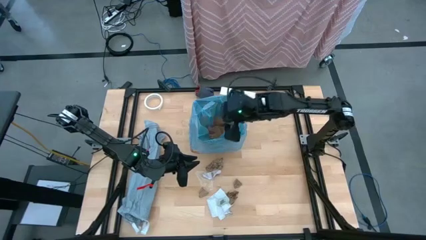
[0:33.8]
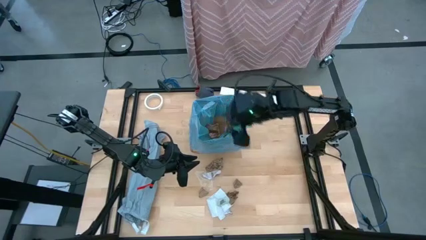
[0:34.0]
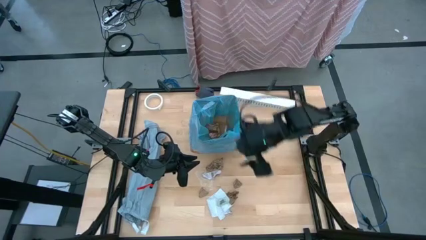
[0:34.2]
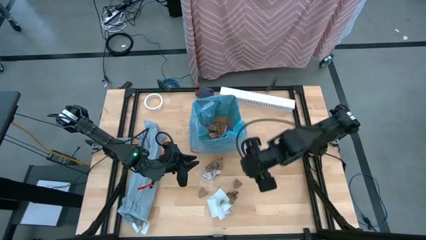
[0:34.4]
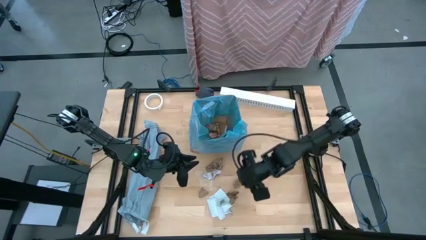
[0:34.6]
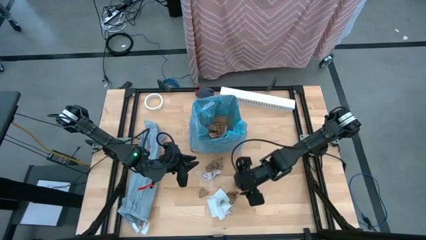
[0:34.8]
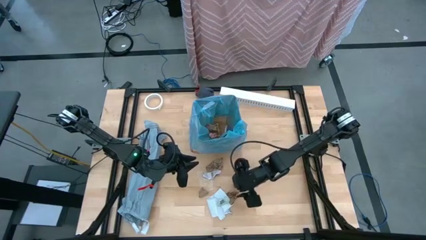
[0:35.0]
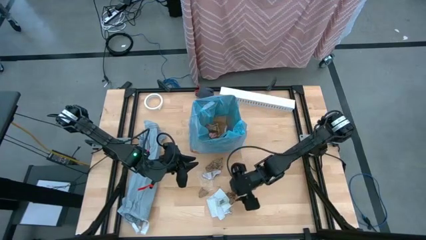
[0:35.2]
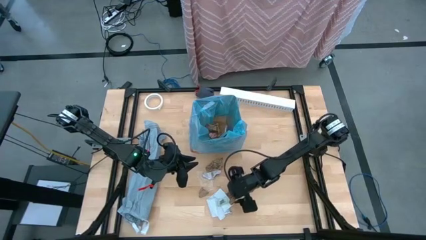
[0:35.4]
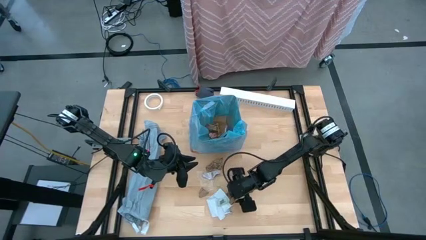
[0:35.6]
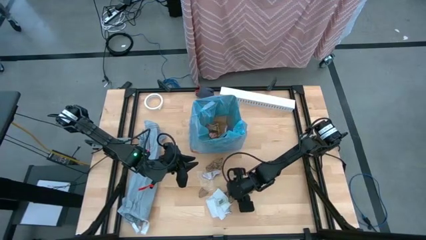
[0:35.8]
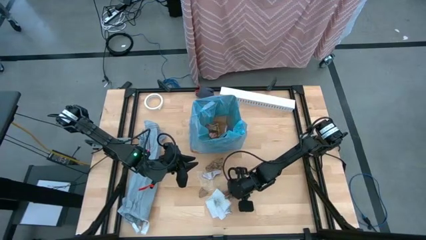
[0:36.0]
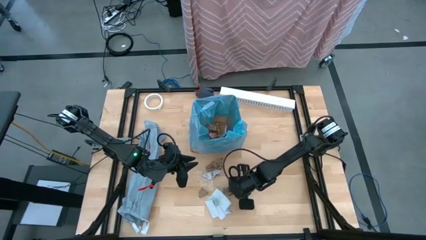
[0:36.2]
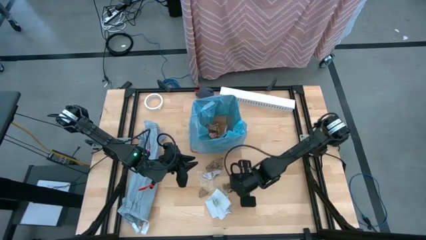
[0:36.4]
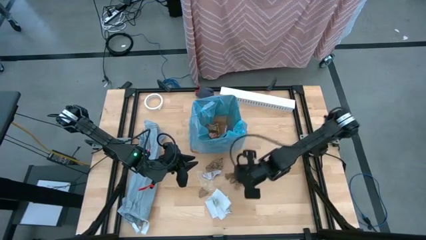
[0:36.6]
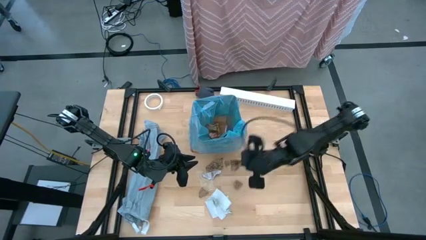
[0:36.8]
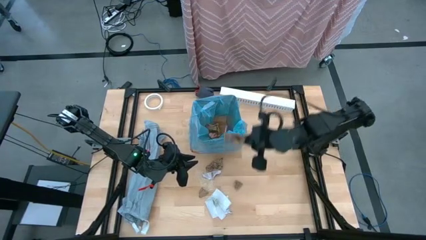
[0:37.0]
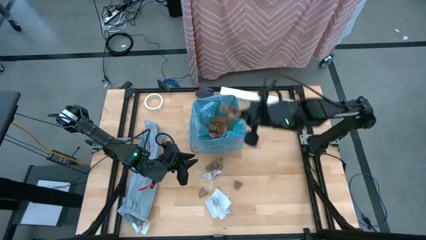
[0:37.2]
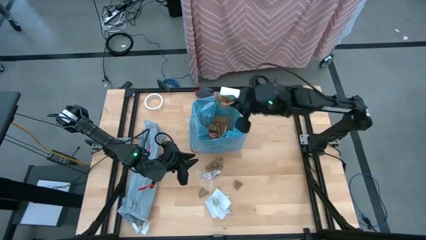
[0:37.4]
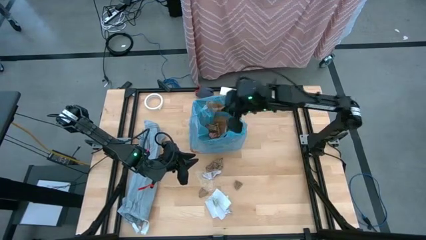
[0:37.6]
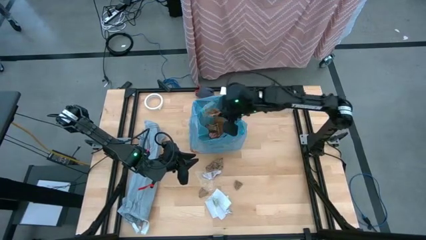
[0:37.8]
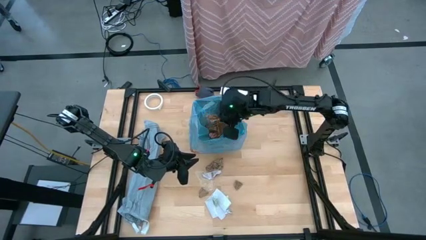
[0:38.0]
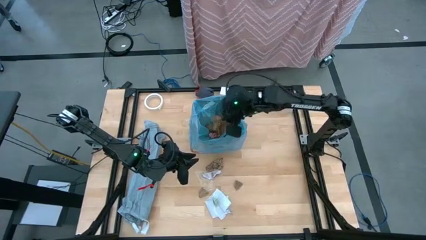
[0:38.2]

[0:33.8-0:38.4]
Task: place trash/remove bag and relplace
Put the brown napkin into the trash bin

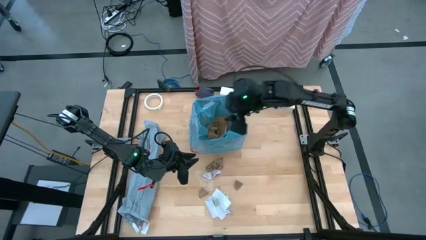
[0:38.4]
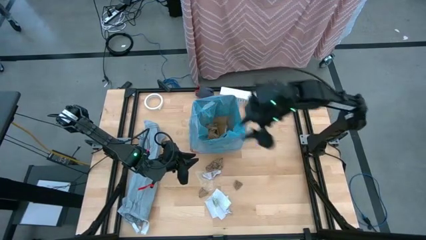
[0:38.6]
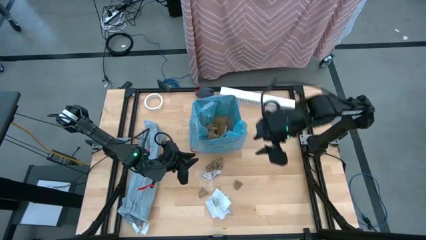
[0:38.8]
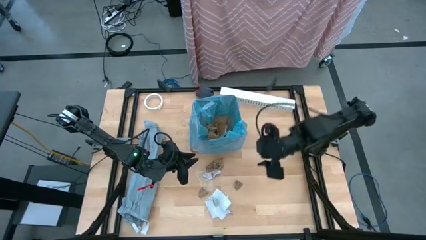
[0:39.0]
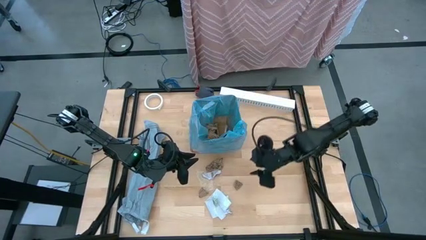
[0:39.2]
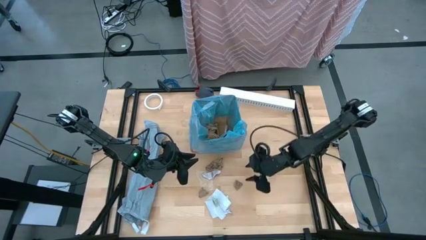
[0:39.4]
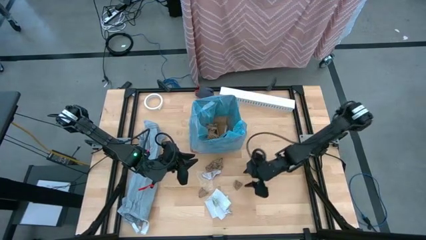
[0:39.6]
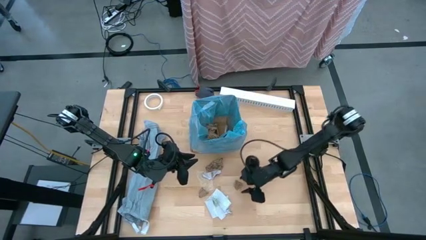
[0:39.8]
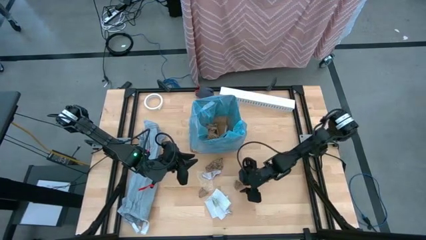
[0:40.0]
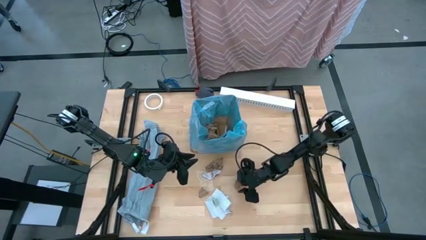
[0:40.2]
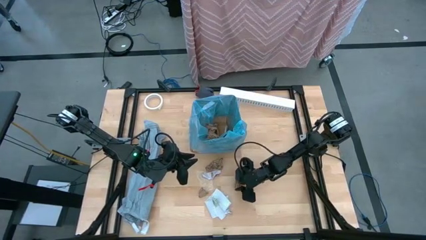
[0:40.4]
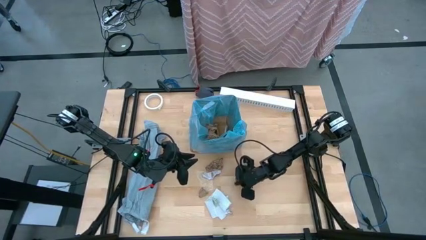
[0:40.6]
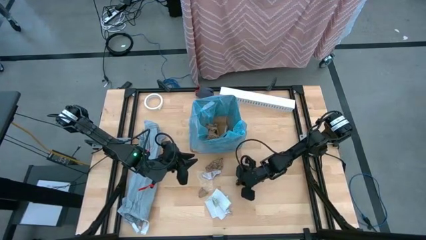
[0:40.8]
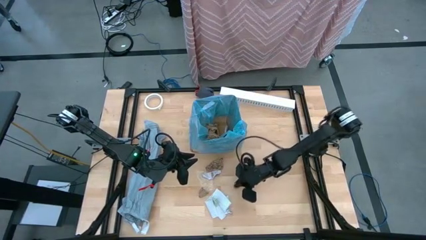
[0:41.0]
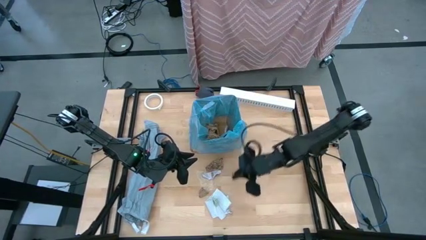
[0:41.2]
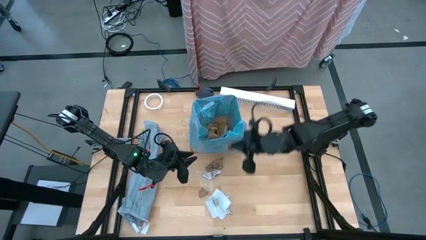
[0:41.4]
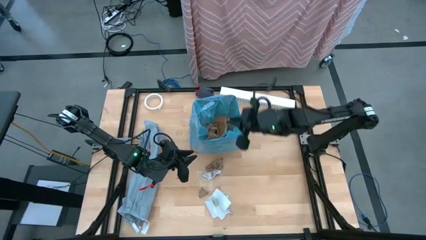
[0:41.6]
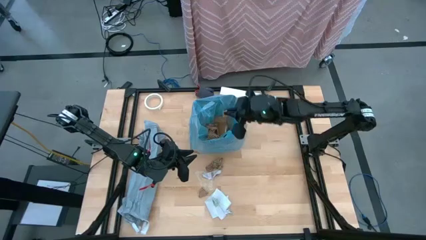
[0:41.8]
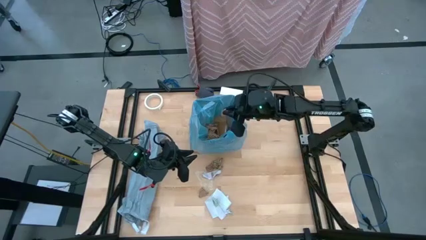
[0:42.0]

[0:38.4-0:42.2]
Put the brown napkin into the trash bin

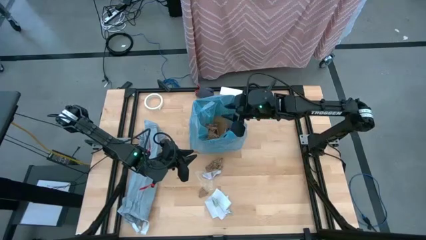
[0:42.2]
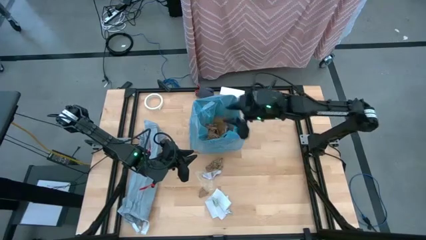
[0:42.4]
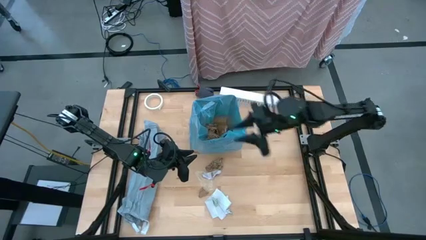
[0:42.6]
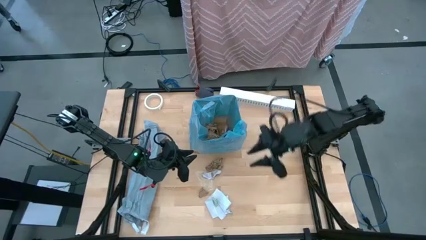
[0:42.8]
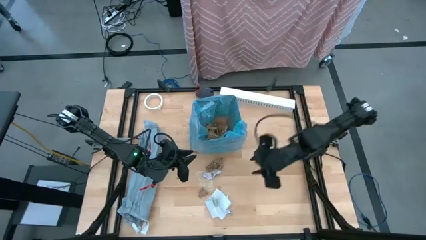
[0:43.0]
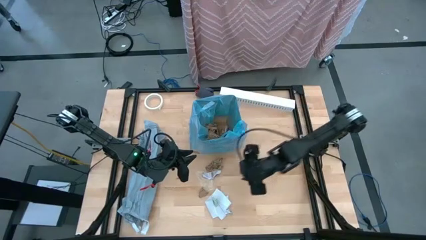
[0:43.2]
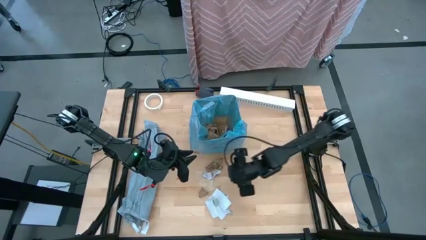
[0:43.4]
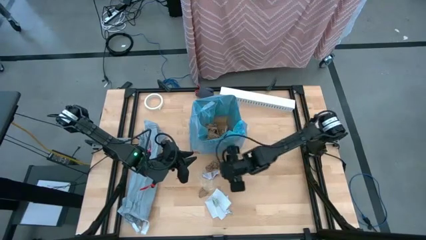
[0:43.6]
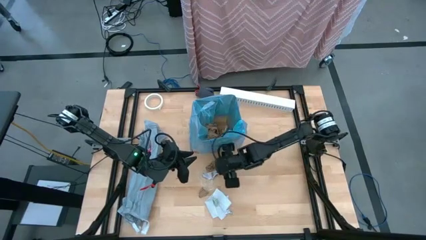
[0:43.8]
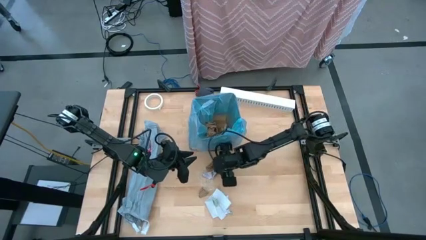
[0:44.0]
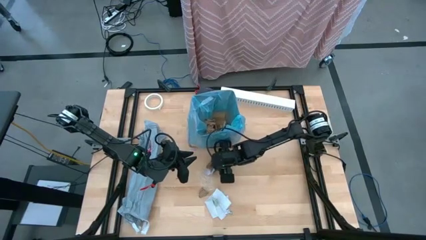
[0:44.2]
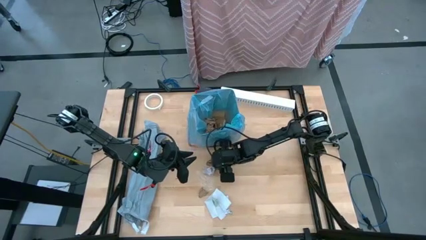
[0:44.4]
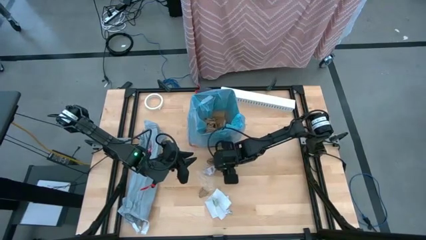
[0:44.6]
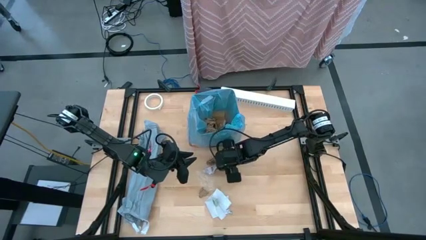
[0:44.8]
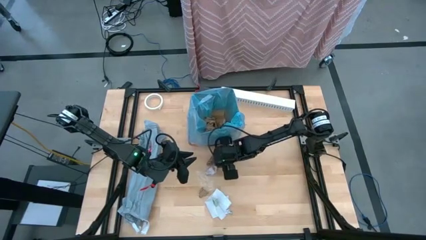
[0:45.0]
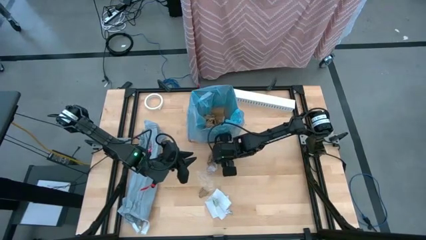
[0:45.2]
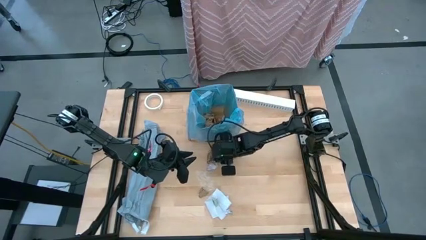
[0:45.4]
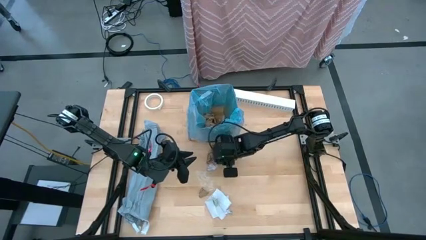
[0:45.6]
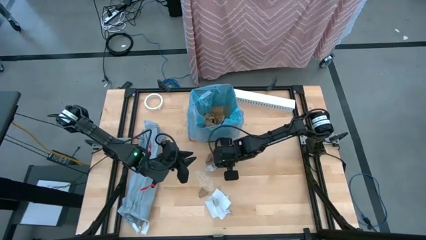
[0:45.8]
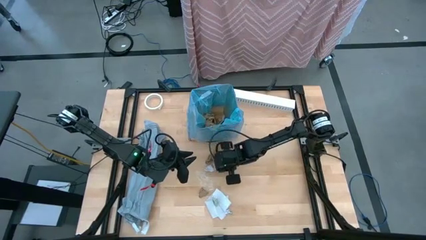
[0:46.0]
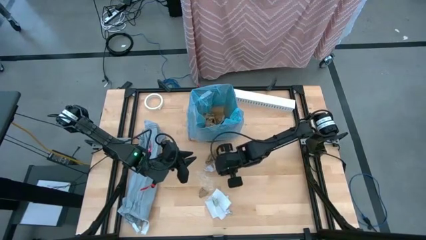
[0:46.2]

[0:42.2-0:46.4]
Put the white paper into the trash bin

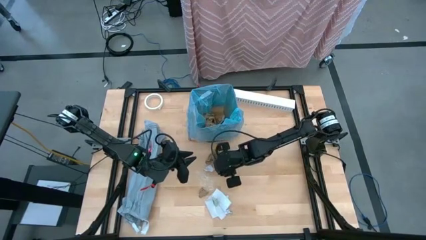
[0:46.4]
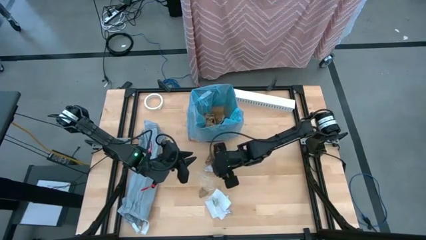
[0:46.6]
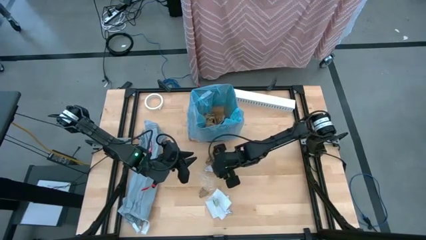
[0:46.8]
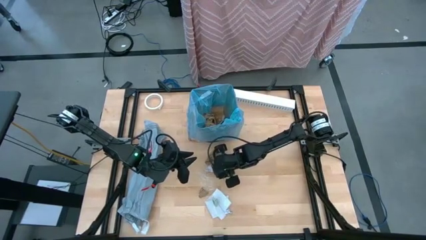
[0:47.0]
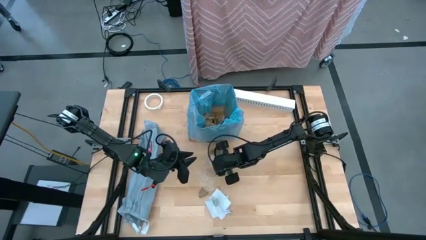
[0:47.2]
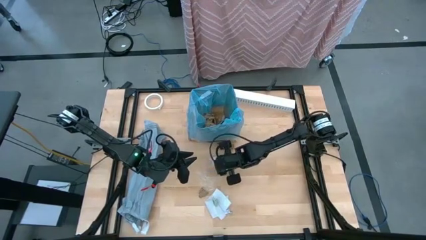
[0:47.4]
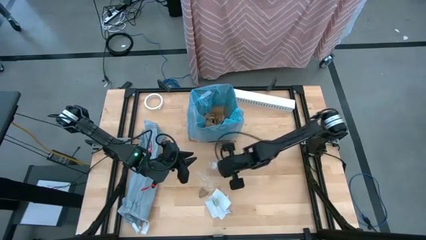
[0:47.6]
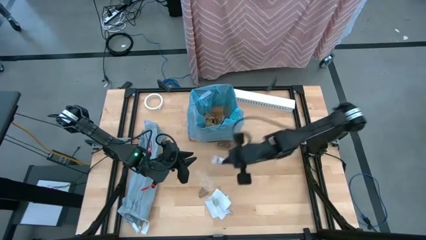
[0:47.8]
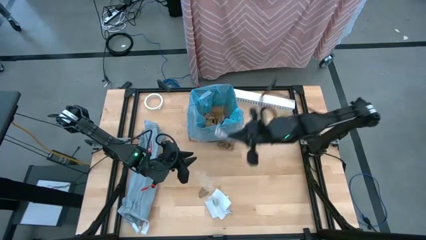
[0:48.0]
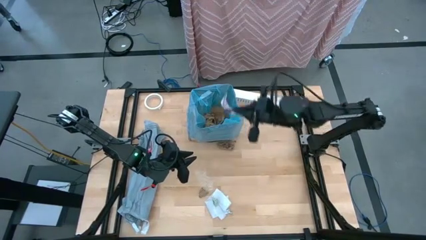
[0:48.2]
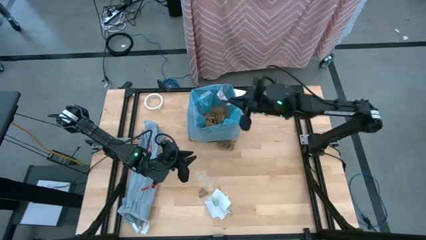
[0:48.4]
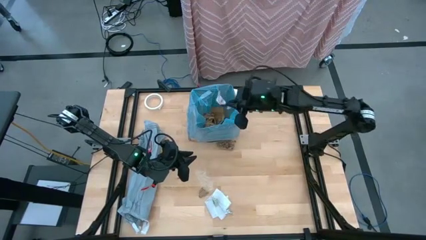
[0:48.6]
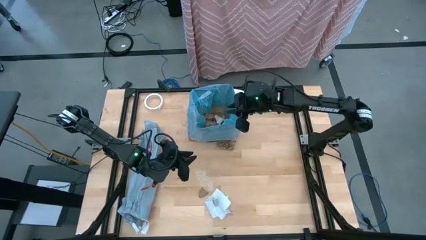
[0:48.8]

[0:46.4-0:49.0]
Put the white paper into the trash bin

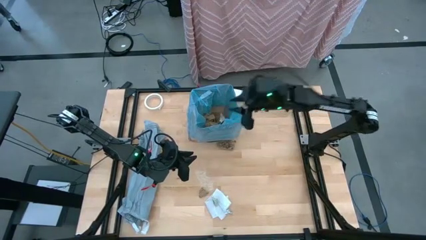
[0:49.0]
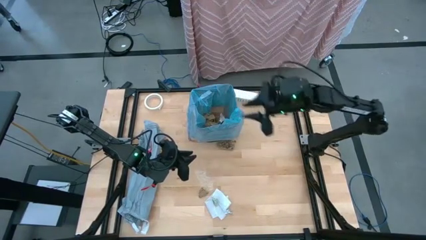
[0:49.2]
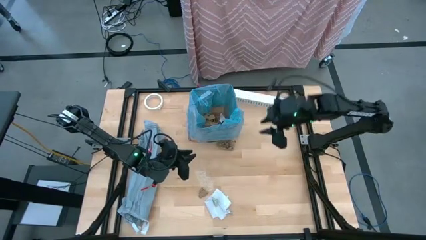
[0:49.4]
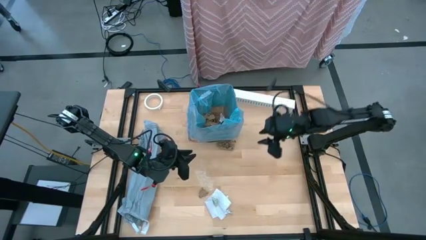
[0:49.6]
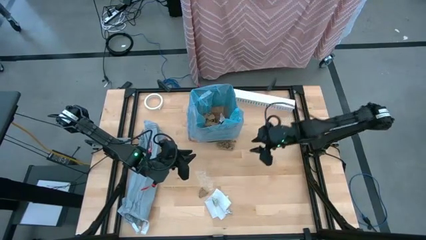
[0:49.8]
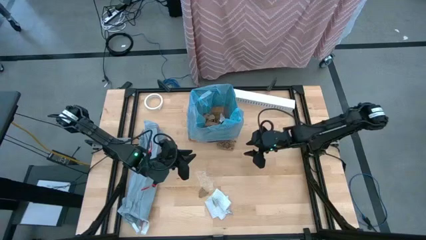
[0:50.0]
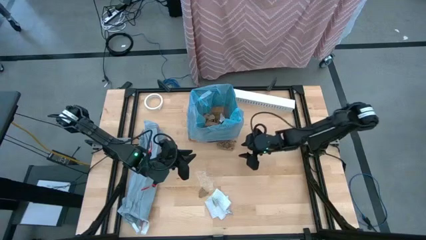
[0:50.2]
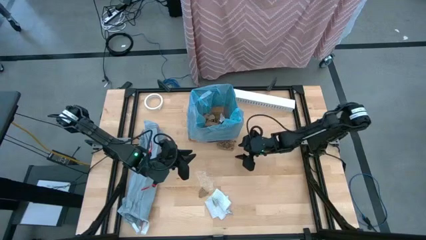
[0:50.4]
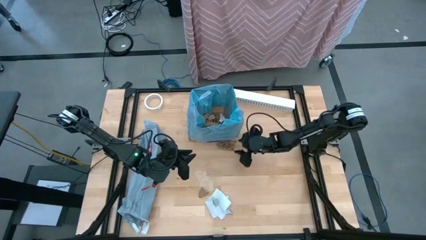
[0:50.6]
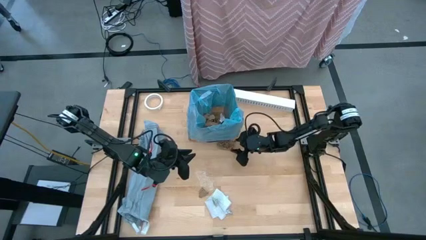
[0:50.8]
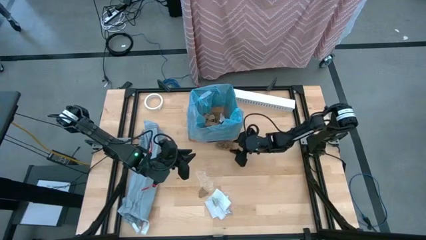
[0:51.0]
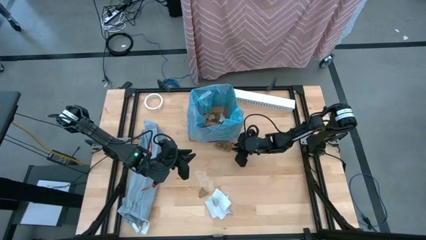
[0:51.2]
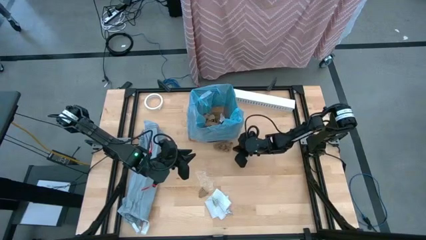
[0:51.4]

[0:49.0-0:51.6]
Put the brown napkin into the trash bin
